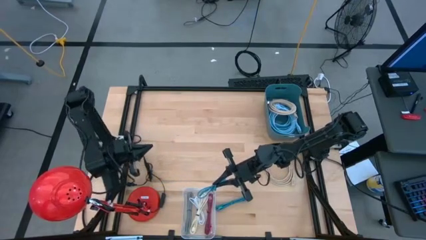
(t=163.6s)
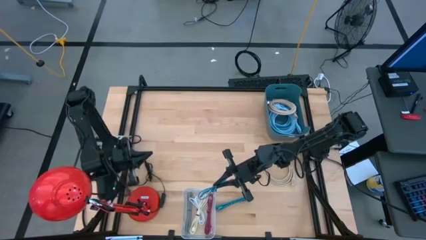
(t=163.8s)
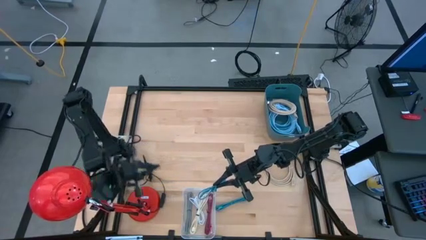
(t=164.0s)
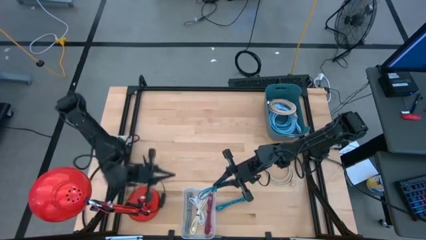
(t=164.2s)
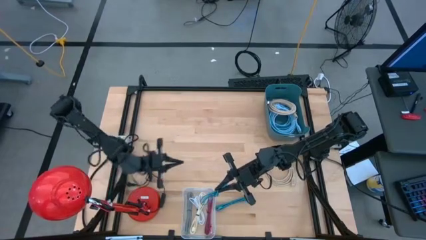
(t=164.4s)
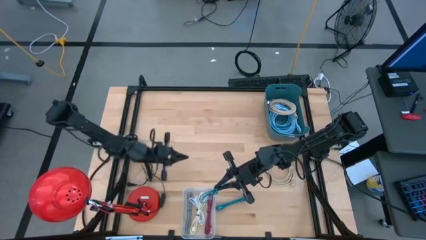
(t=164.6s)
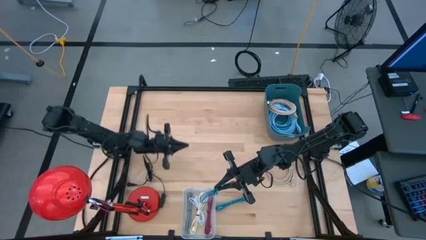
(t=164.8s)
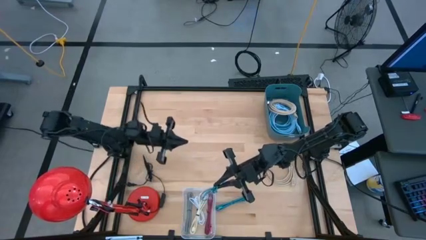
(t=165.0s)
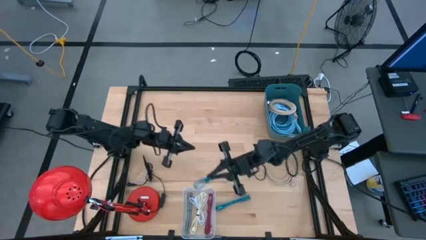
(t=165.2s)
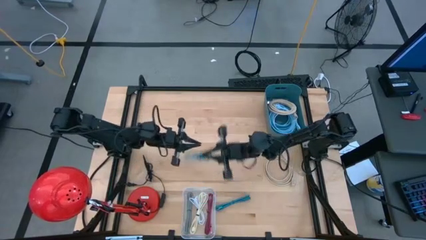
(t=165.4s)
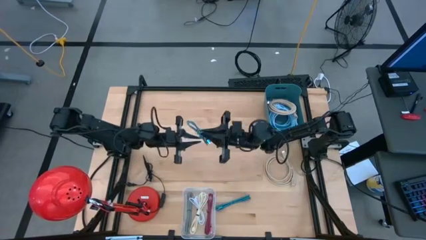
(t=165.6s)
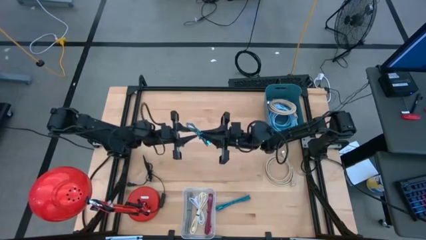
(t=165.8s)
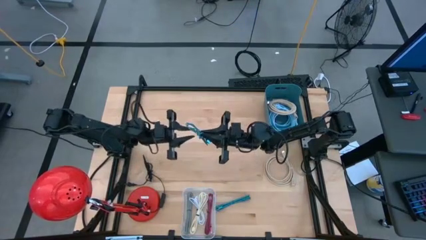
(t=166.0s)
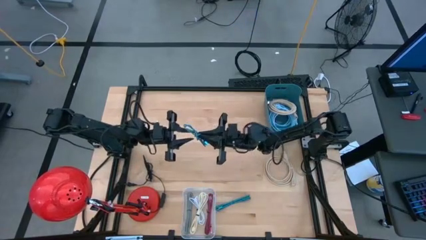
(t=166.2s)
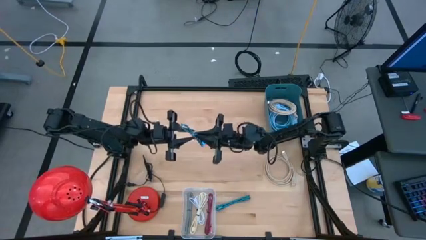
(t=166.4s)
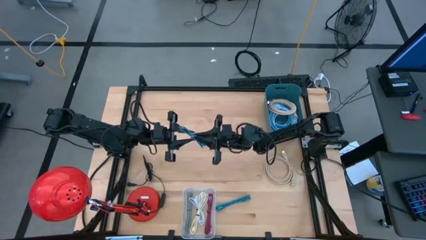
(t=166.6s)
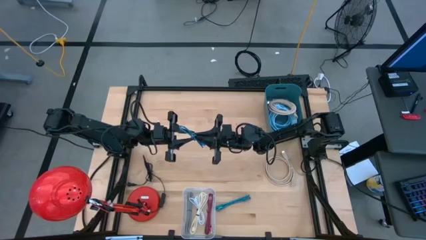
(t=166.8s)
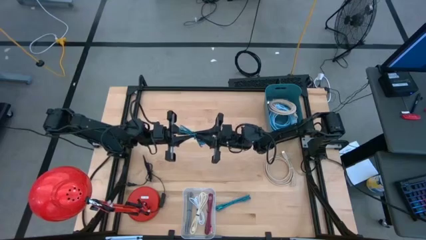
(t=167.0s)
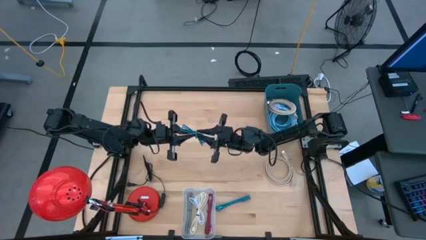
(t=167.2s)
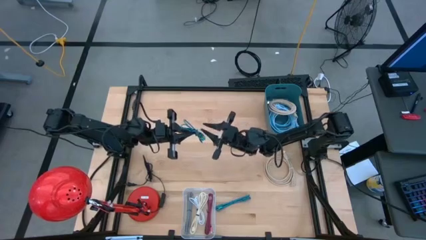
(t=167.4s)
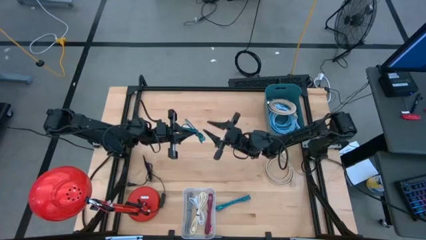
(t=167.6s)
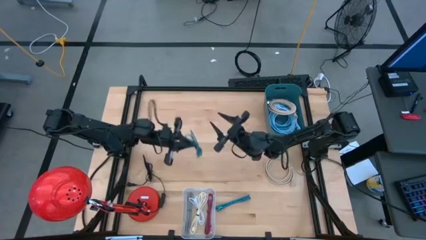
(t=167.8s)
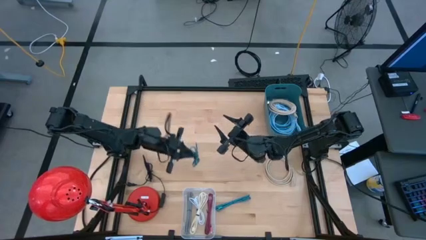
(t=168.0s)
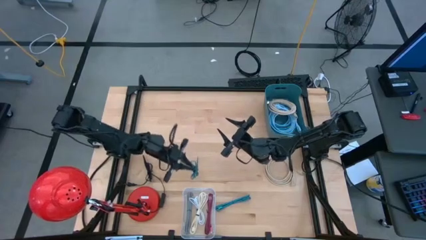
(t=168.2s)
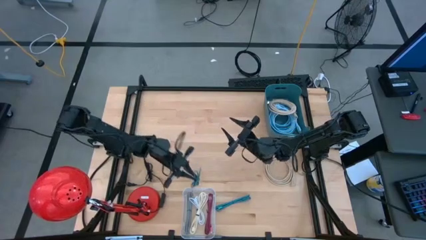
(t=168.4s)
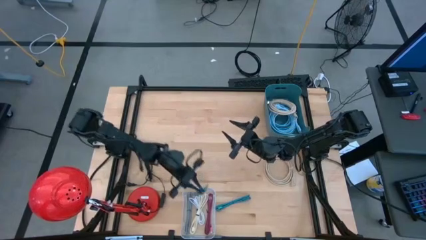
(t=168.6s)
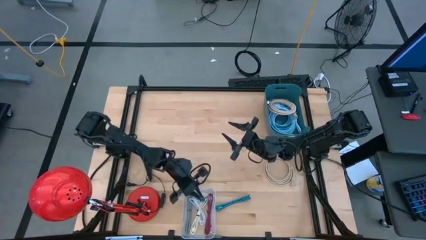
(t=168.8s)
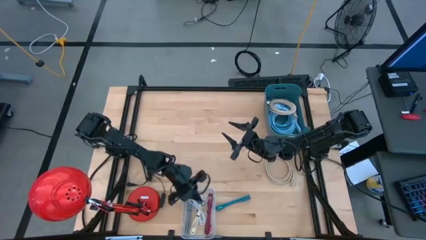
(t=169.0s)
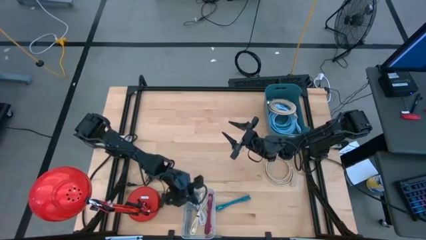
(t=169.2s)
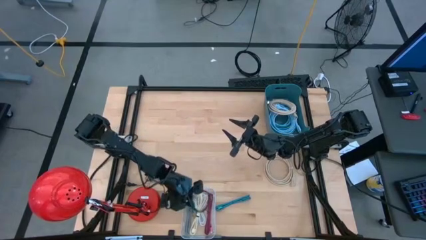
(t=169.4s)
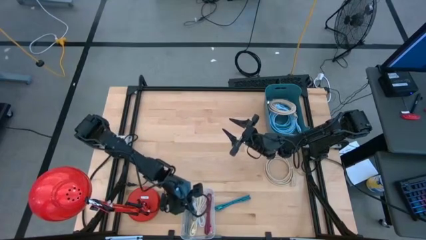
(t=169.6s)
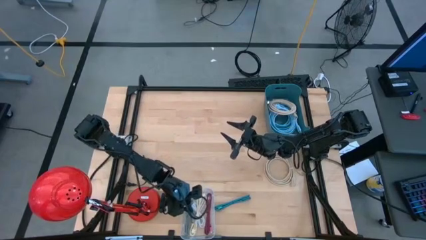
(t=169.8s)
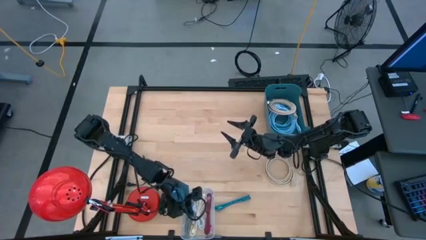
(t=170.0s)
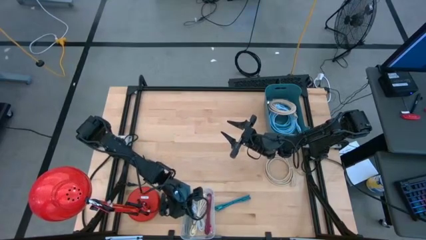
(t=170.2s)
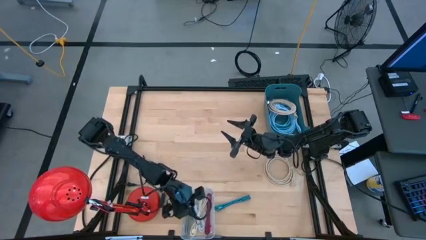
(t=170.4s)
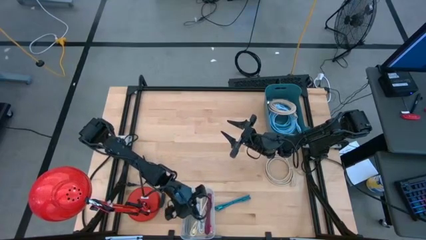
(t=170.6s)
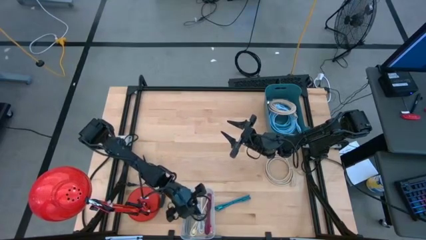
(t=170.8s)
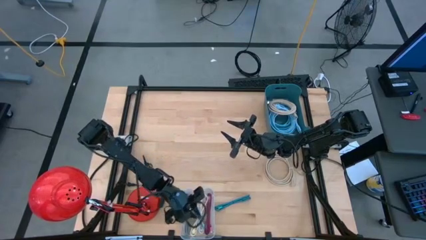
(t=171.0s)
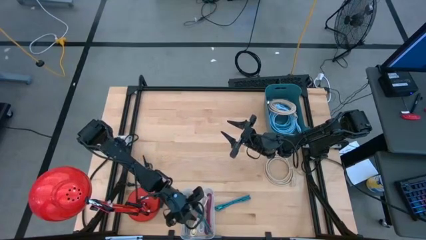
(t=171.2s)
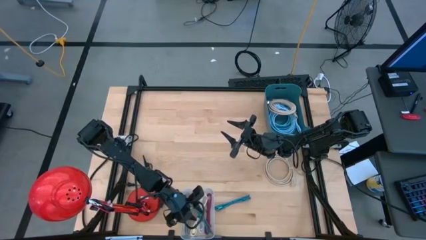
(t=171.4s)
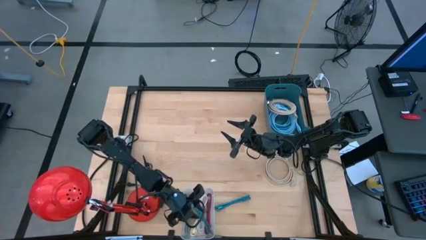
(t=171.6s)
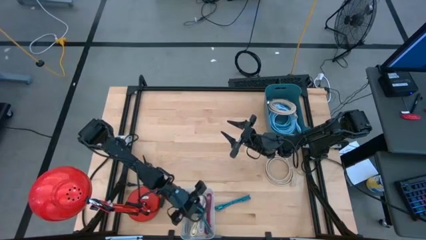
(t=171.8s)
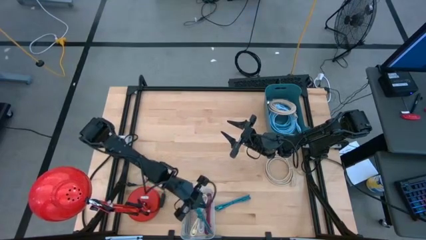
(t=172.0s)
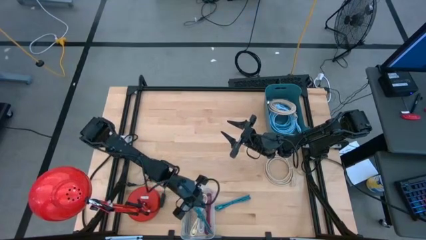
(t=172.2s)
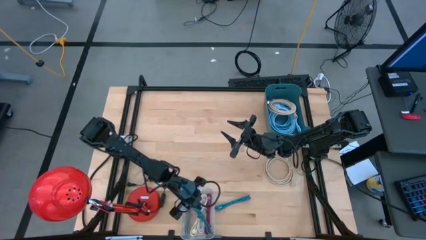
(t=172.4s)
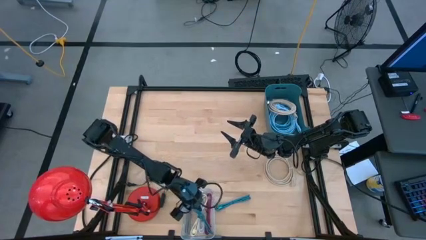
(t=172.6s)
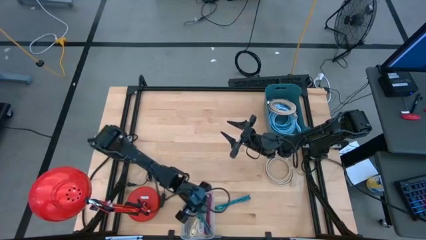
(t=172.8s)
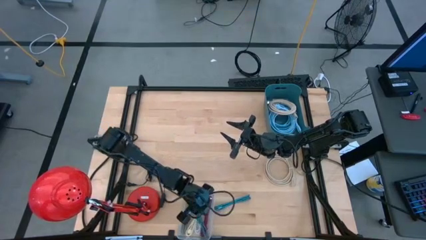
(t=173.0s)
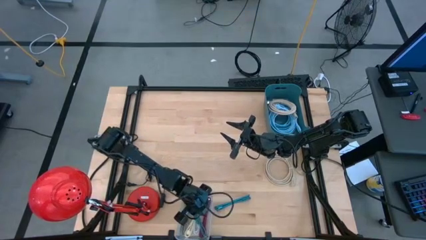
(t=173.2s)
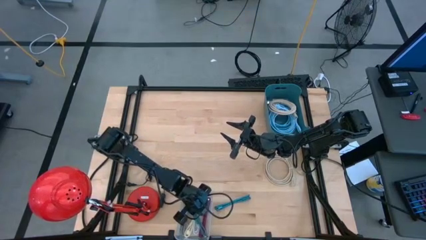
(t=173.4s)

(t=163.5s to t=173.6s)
Task: Pick & Place USB Port
Put the top blue charger cable into the transparent bin

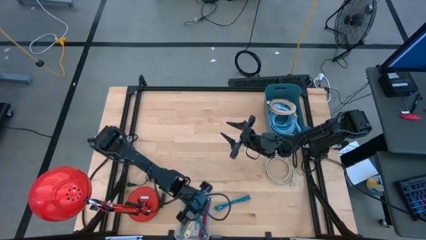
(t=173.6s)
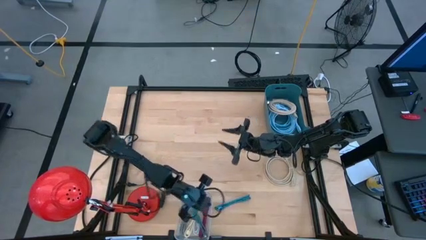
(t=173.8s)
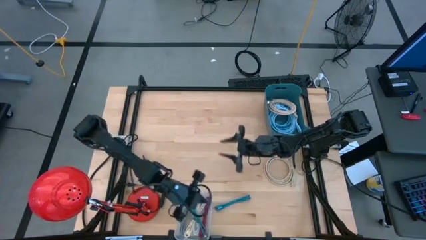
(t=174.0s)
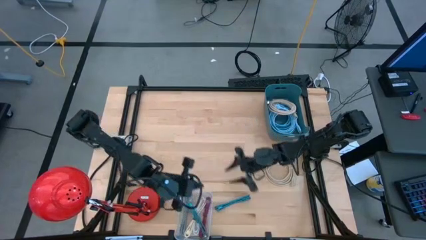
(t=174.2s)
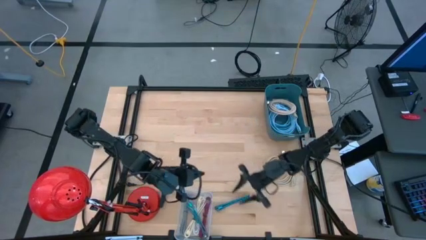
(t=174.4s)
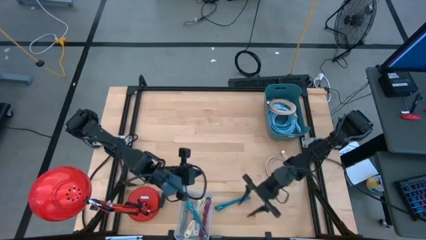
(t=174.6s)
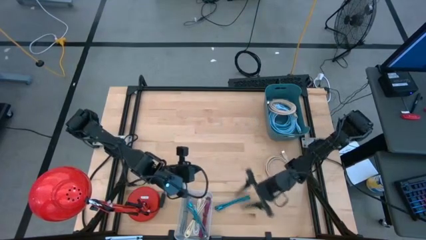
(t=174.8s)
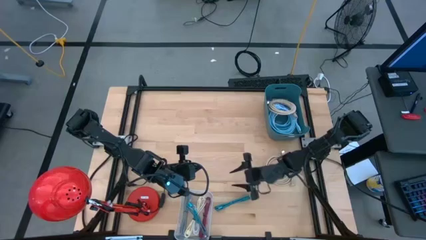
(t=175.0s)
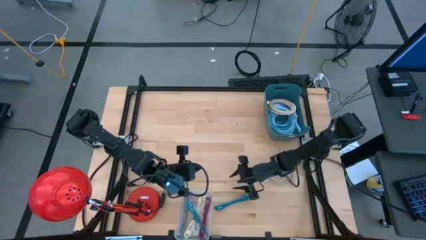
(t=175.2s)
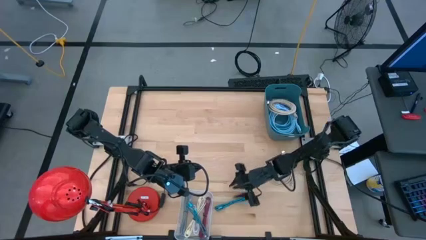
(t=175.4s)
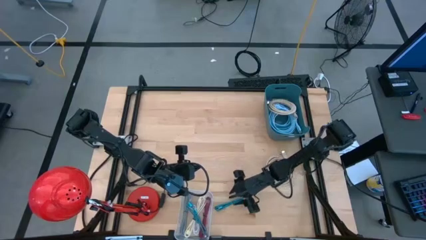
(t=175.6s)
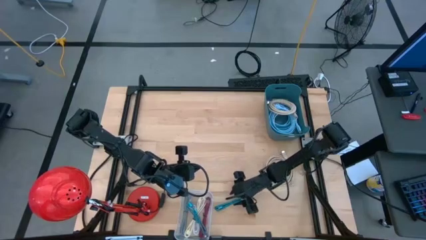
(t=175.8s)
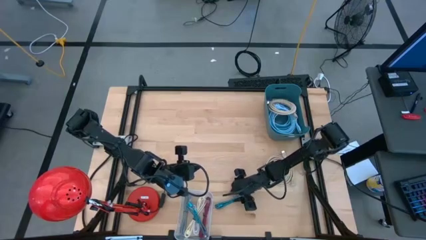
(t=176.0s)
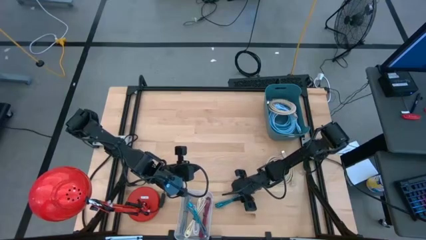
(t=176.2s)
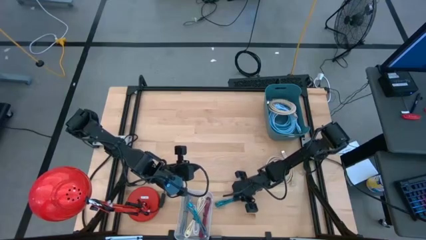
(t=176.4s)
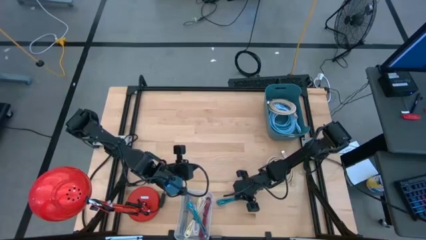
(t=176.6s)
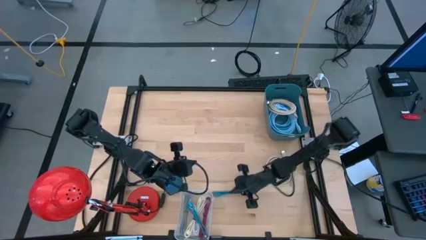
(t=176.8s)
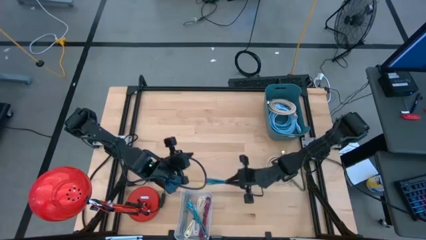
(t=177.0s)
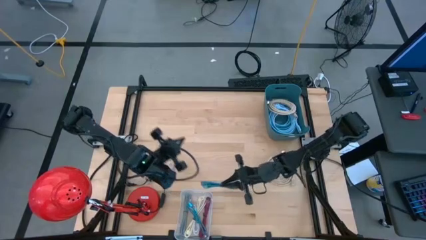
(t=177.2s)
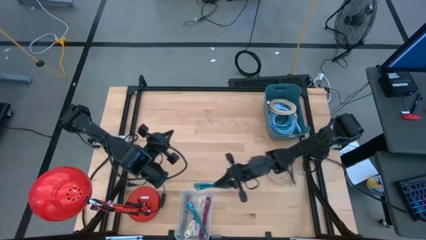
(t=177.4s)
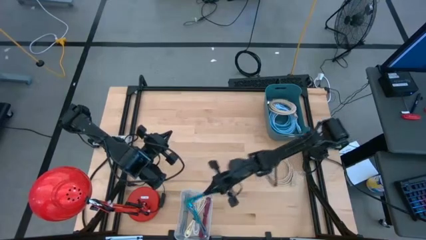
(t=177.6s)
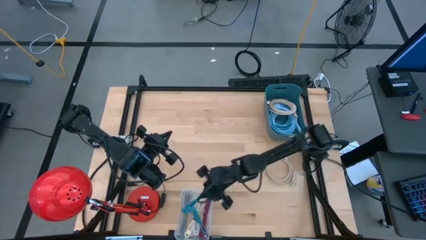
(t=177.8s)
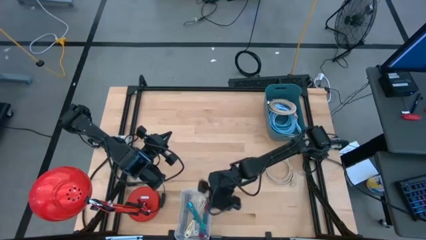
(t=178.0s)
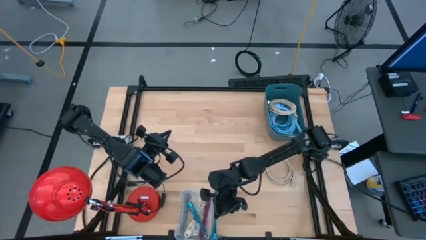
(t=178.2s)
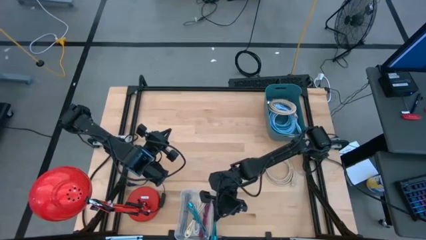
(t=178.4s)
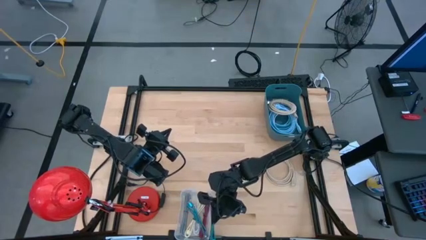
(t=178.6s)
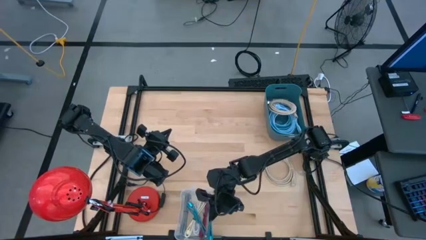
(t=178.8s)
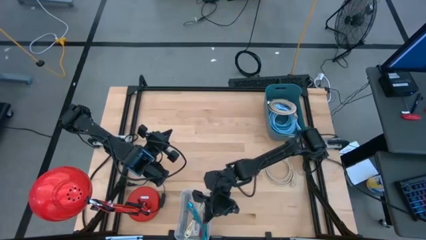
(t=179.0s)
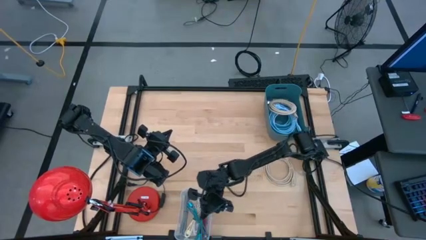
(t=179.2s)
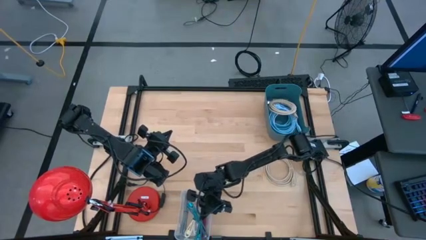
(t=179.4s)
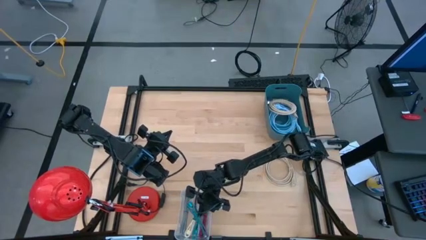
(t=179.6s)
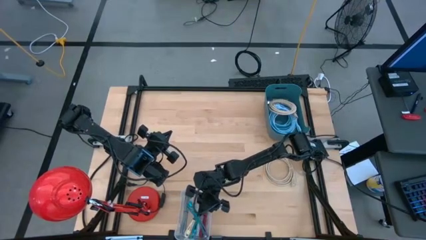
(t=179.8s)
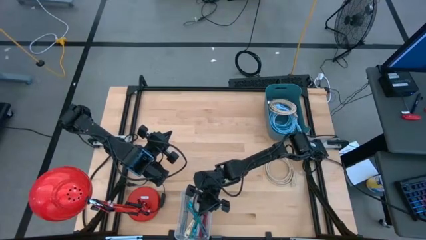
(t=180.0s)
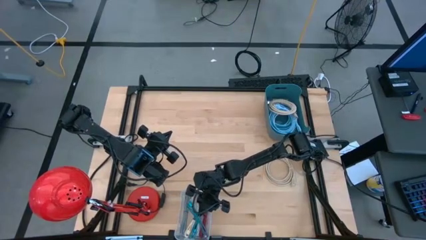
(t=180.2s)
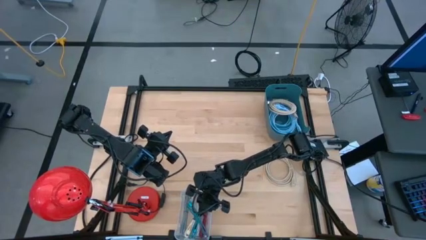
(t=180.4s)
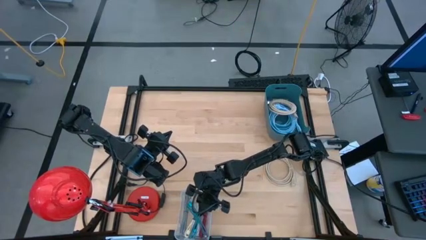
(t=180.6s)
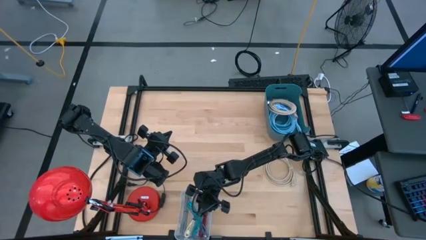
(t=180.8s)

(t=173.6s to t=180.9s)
Put the blue charger cable into the transparent bin
